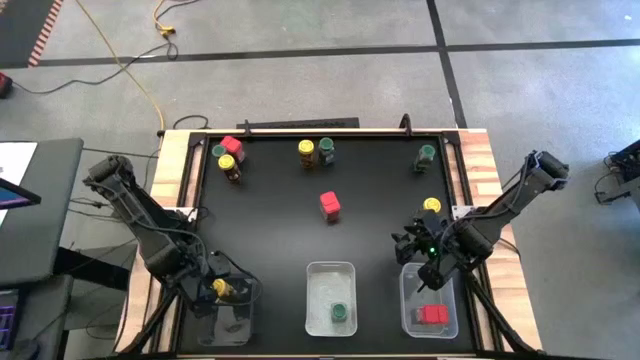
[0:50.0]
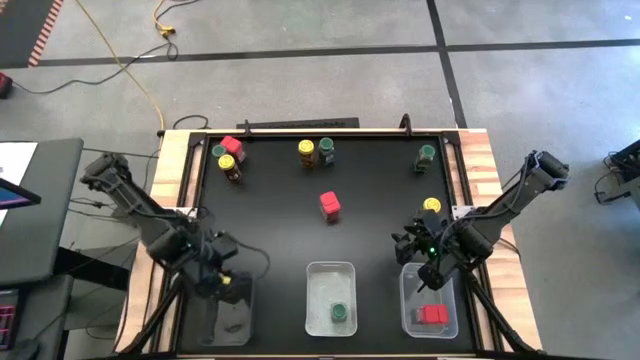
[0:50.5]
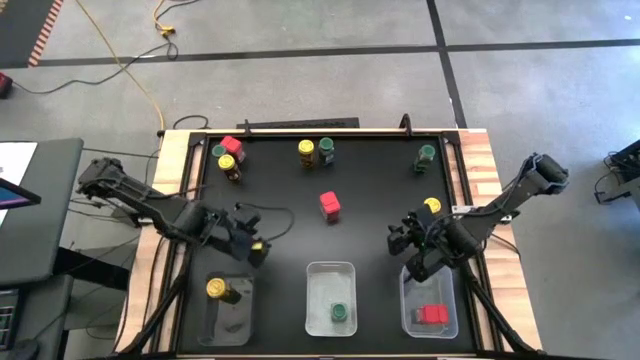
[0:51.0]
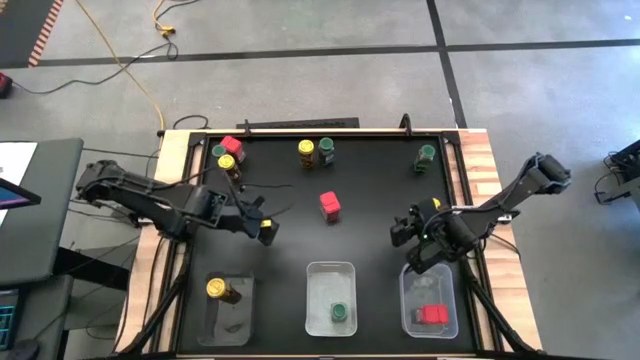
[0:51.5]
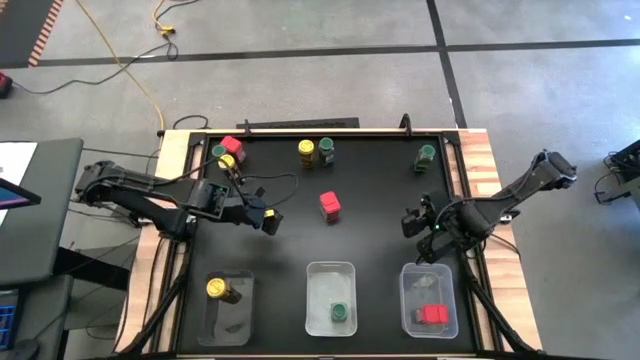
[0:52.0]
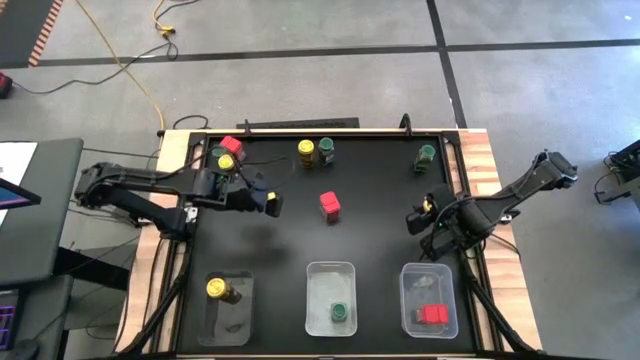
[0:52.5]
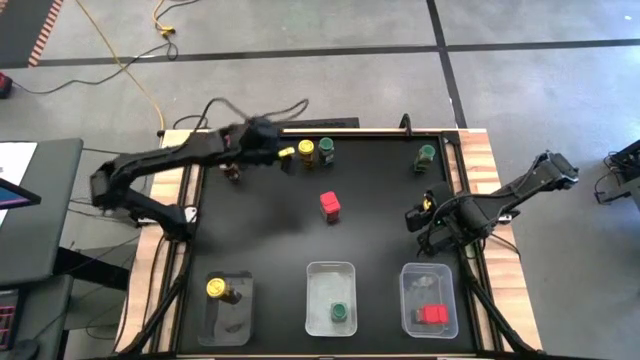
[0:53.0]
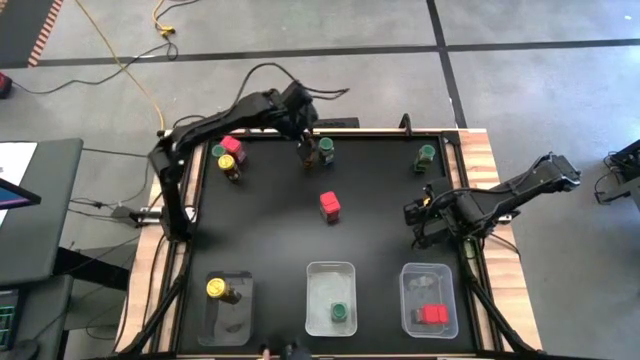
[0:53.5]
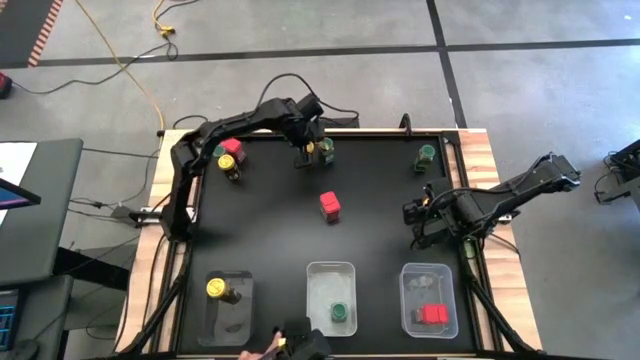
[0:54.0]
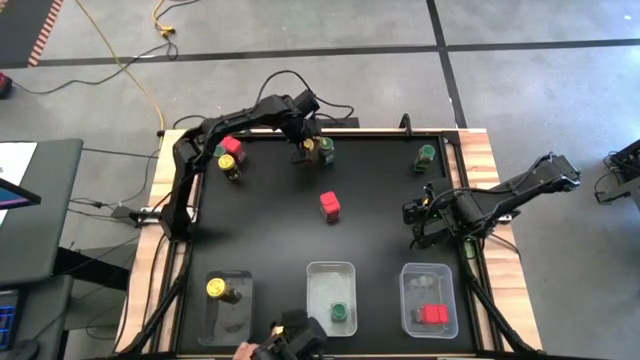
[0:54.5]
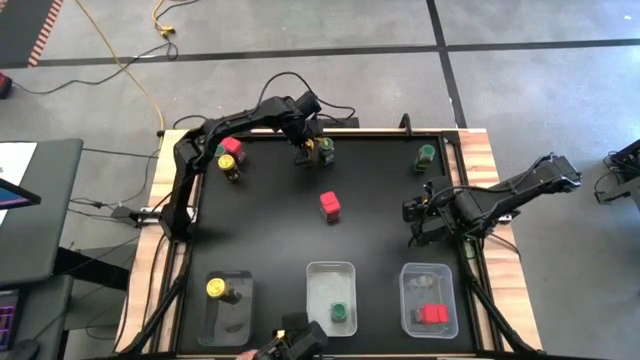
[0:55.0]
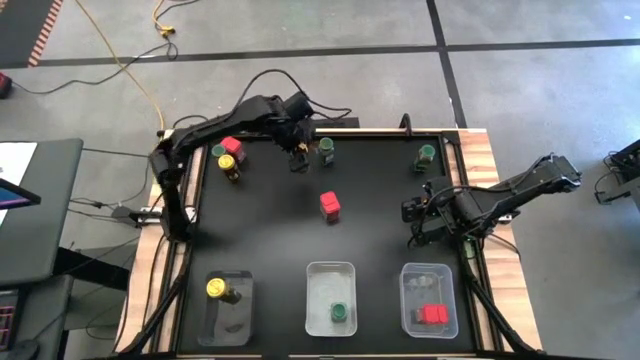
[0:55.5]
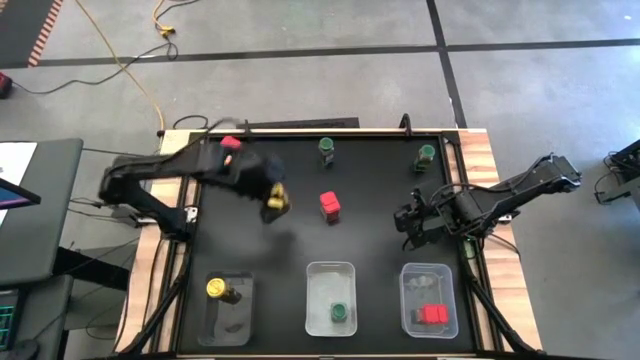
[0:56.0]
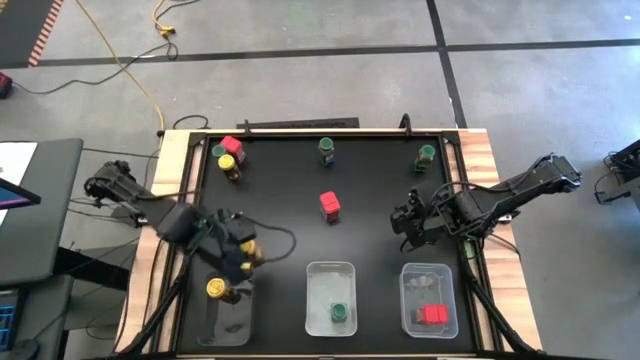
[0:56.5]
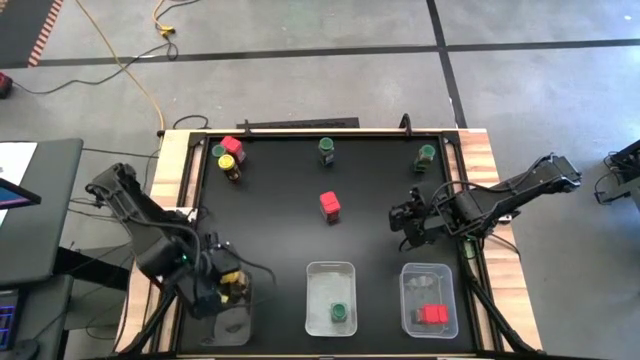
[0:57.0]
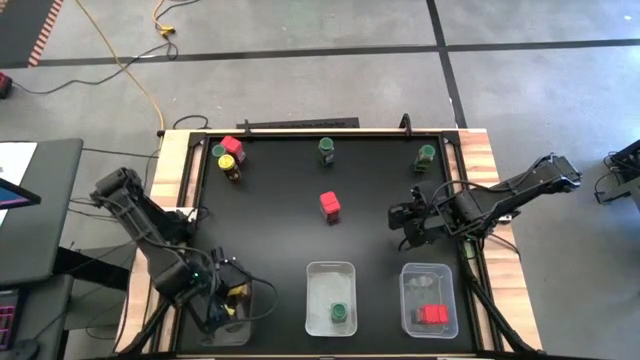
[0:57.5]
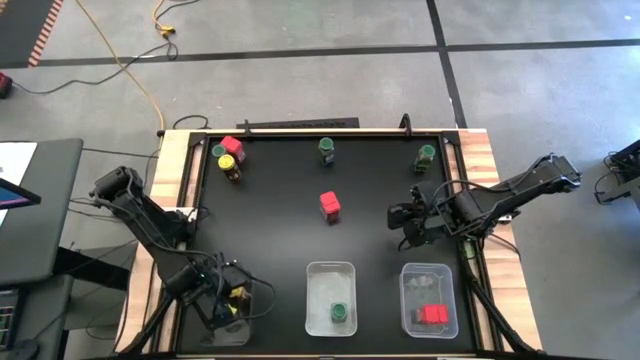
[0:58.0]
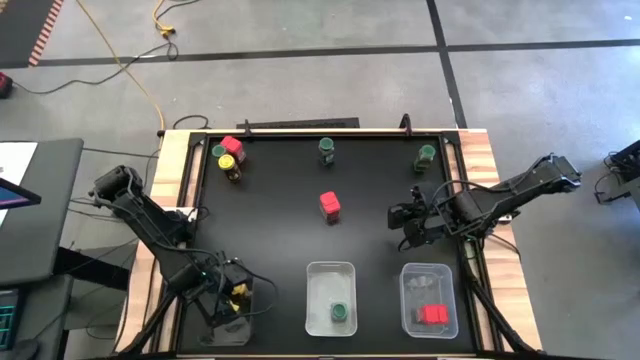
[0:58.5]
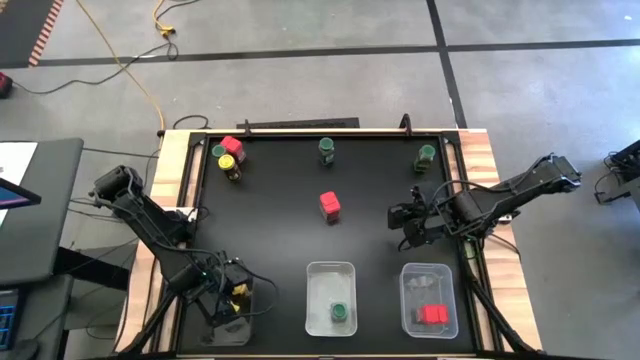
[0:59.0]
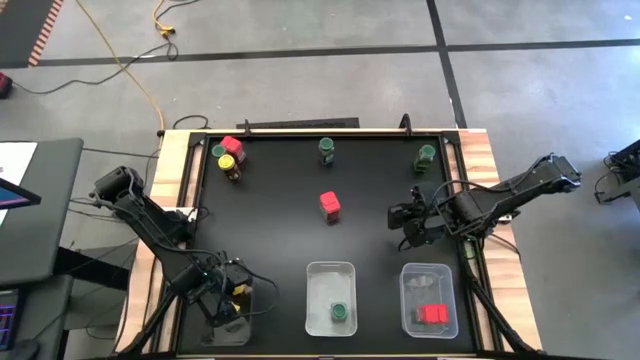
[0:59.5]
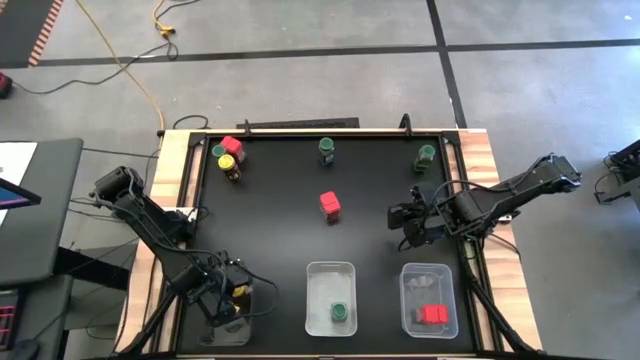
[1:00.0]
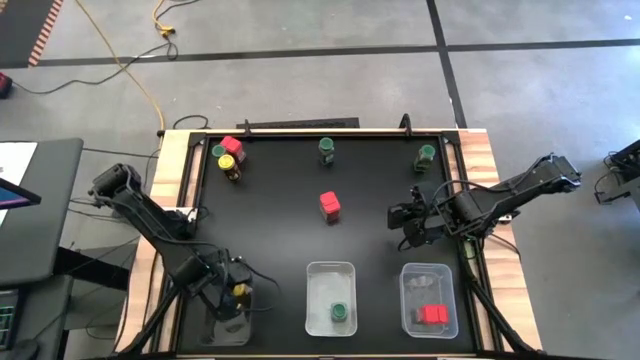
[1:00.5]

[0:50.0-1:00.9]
Task: Sort spices by type
Put the top center yellow seasoning bottle into the black bin

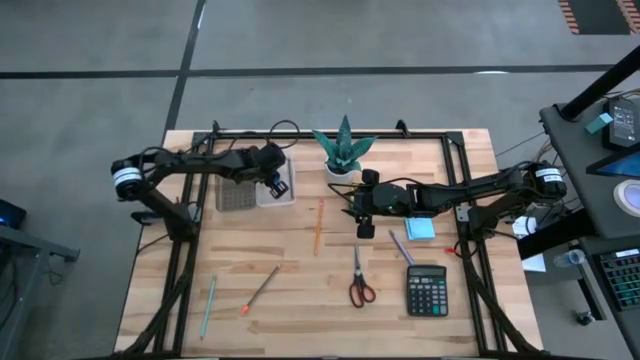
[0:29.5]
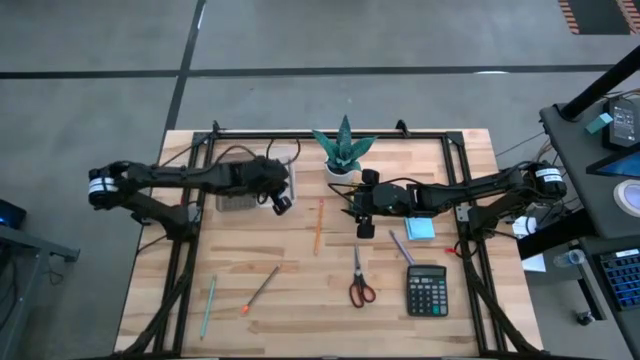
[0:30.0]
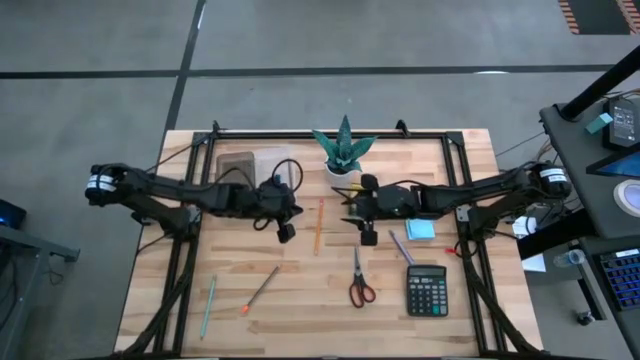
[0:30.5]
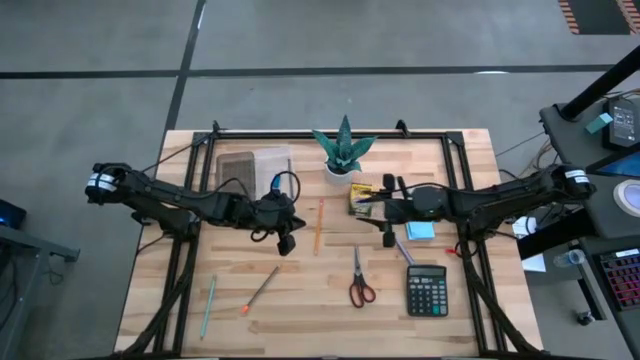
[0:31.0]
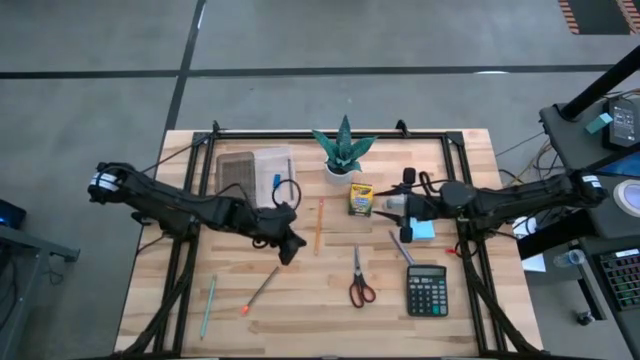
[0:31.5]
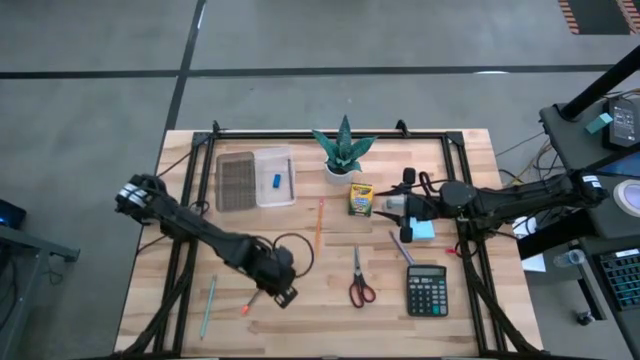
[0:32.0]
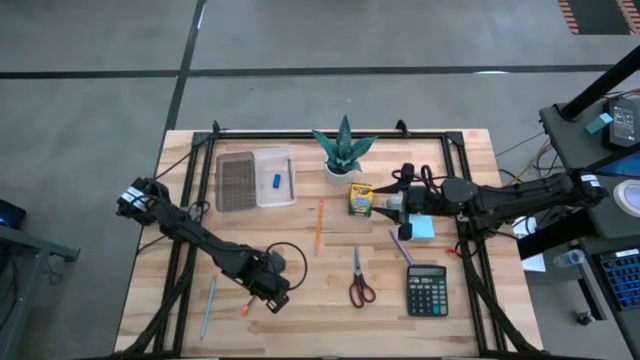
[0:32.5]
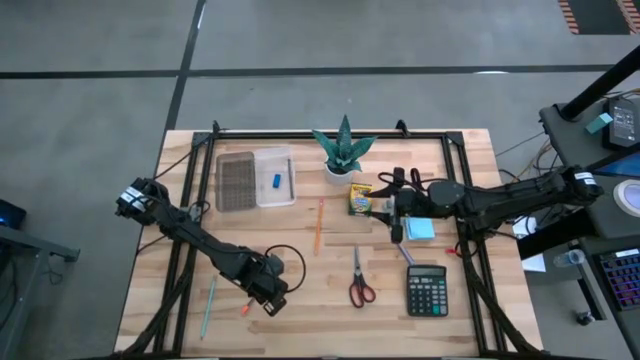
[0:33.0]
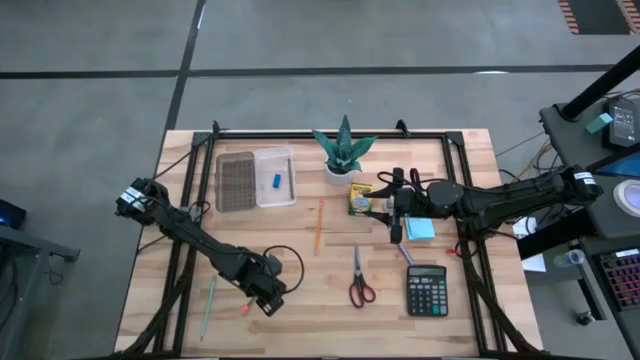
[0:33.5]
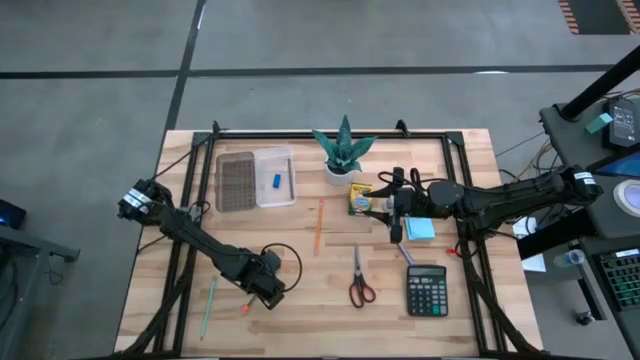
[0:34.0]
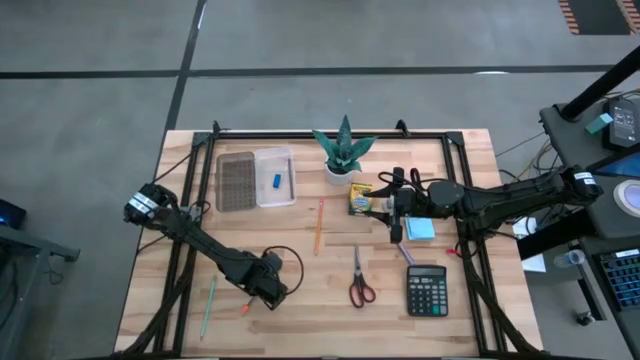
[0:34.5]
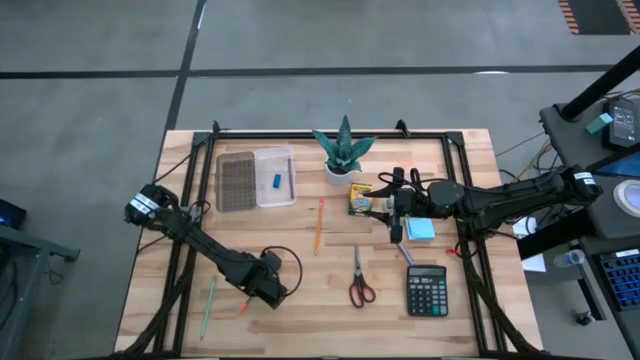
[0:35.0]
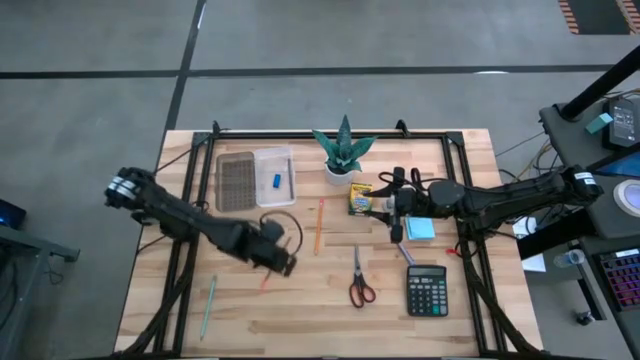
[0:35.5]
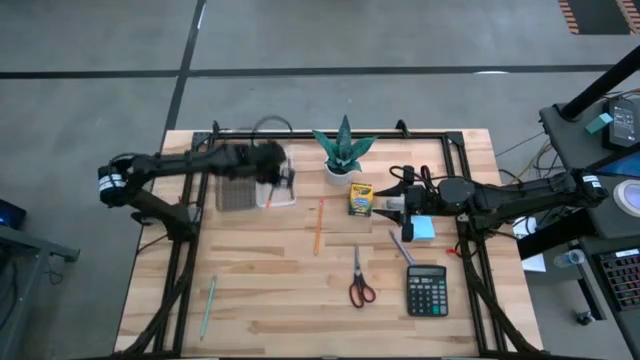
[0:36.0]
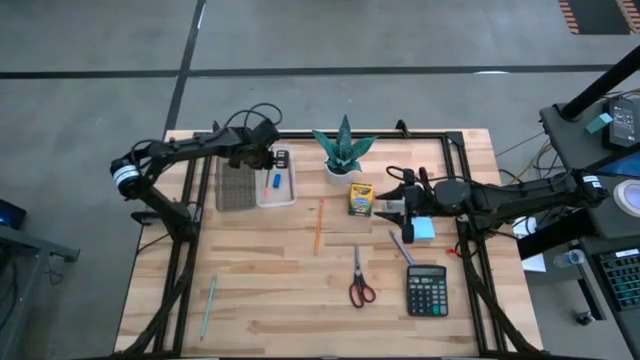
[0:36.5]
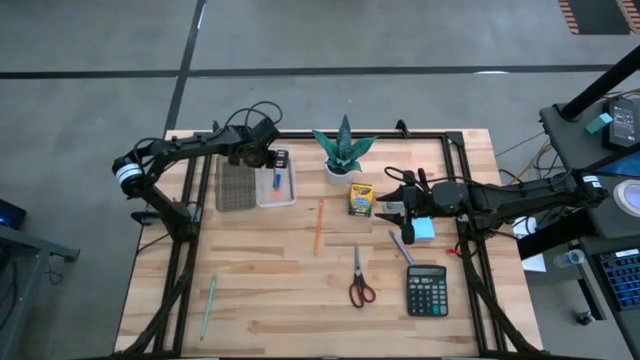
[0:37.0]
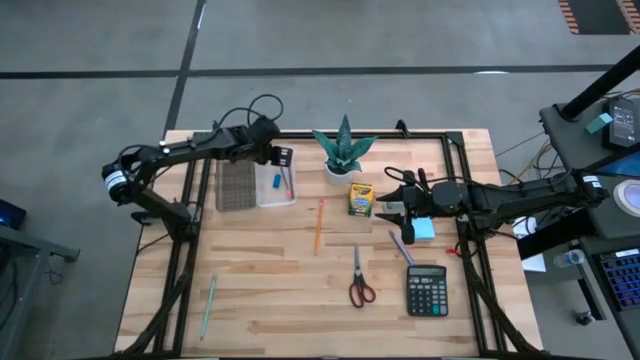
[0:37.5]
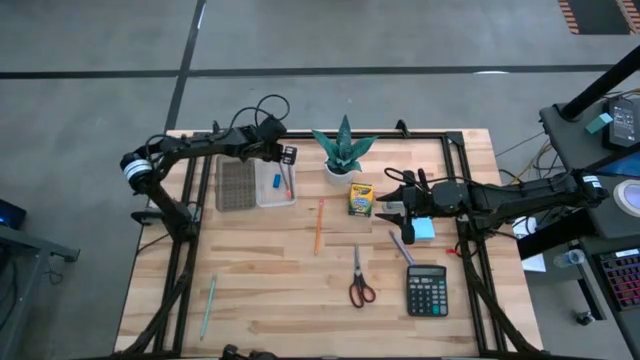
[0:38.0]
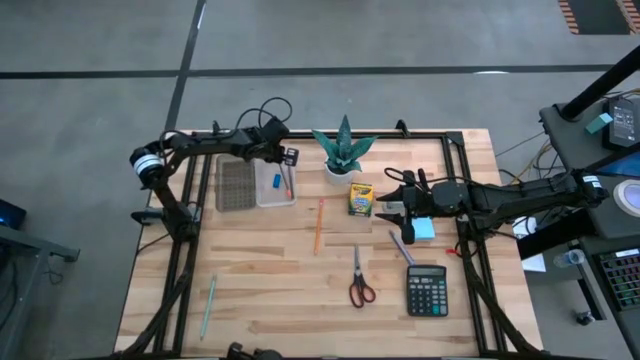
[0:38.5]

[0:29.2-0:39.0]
Task: Pack school essentials
Put the black pencil into the black supply box
